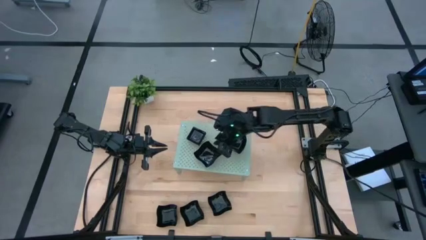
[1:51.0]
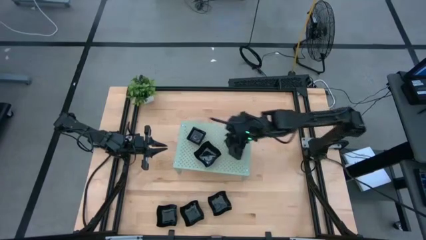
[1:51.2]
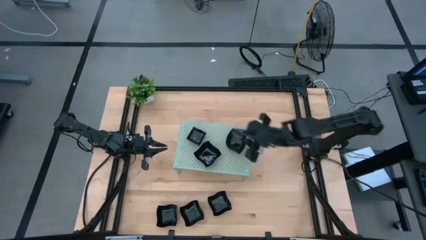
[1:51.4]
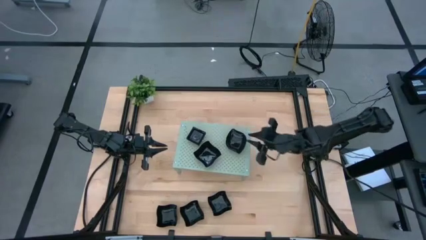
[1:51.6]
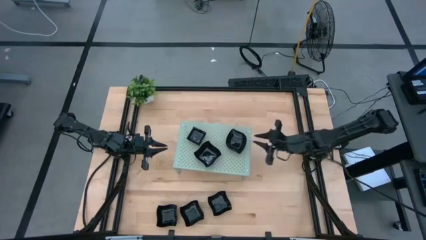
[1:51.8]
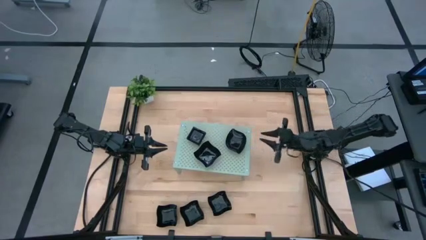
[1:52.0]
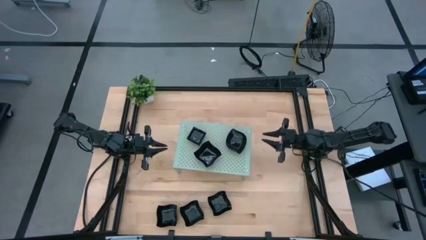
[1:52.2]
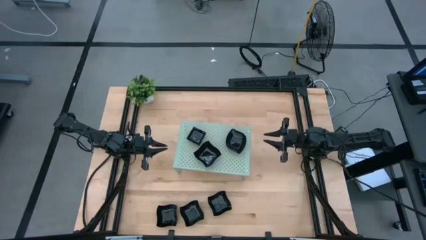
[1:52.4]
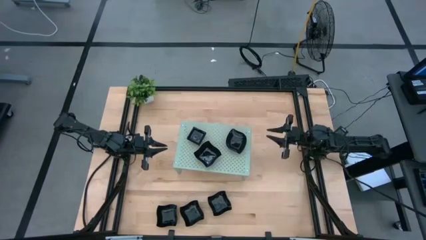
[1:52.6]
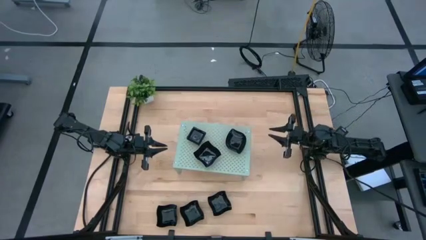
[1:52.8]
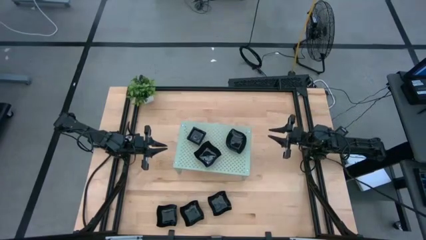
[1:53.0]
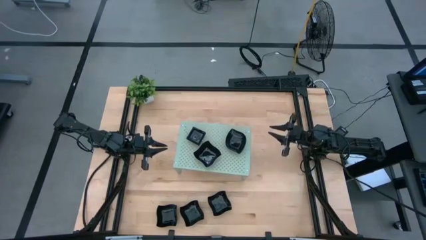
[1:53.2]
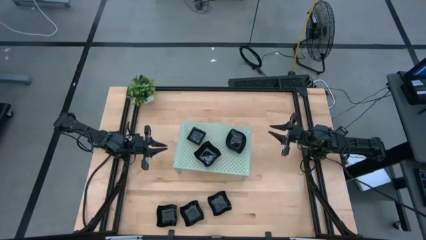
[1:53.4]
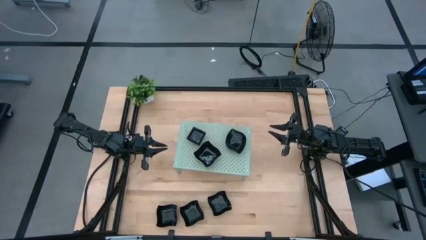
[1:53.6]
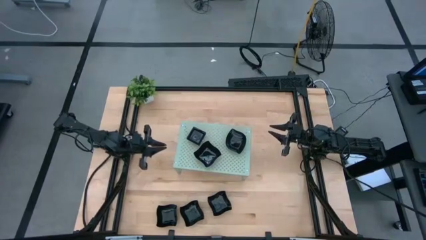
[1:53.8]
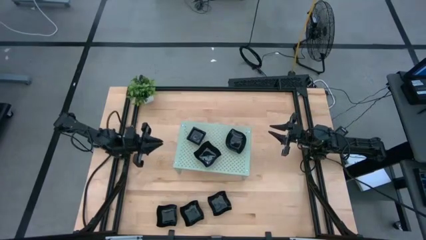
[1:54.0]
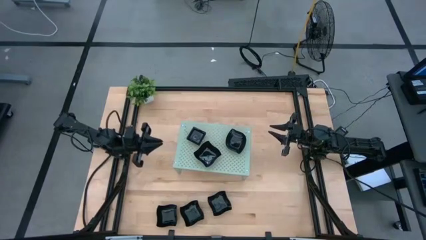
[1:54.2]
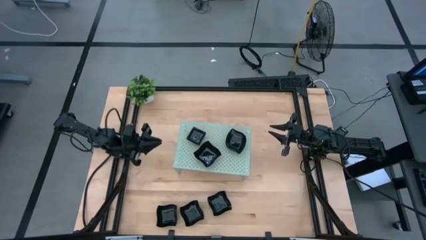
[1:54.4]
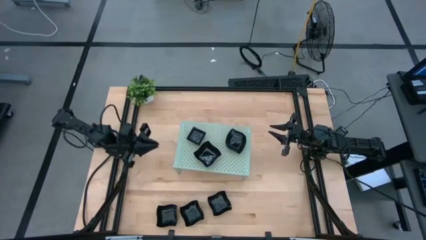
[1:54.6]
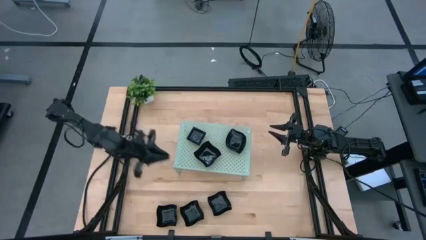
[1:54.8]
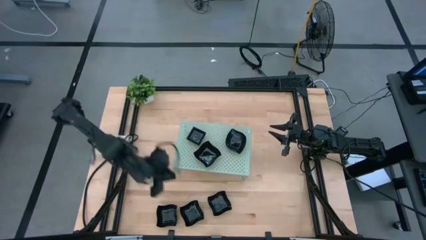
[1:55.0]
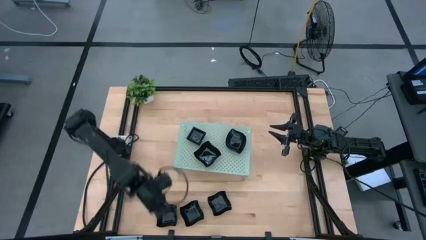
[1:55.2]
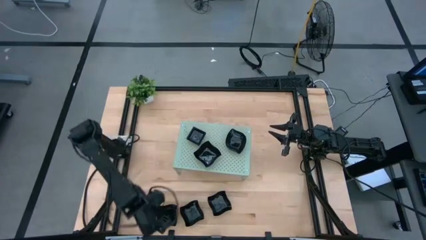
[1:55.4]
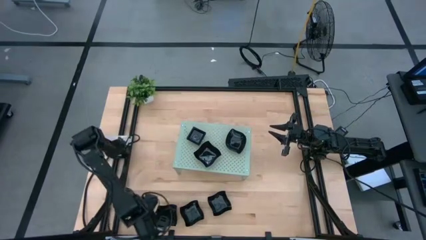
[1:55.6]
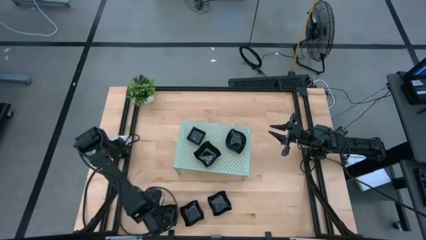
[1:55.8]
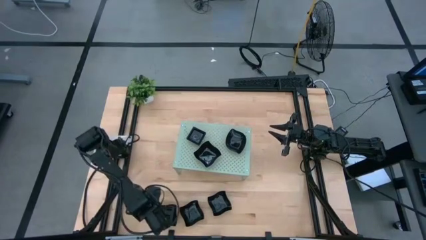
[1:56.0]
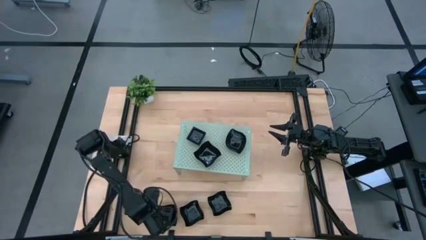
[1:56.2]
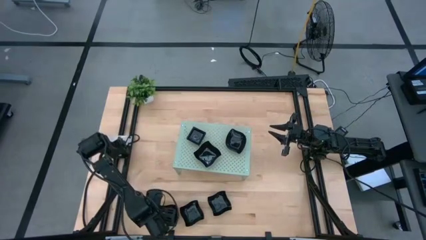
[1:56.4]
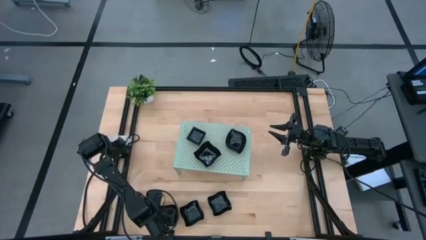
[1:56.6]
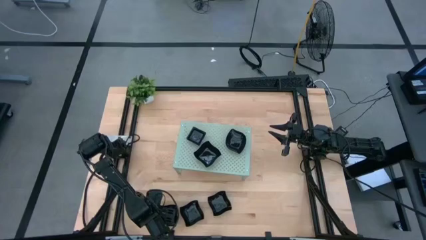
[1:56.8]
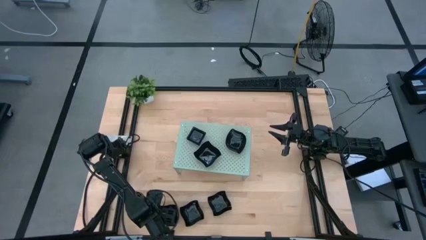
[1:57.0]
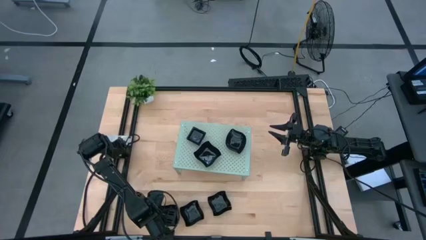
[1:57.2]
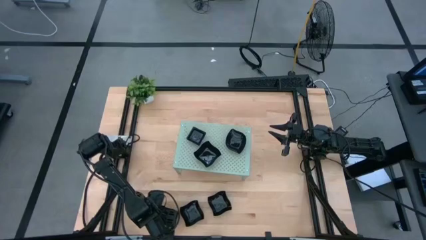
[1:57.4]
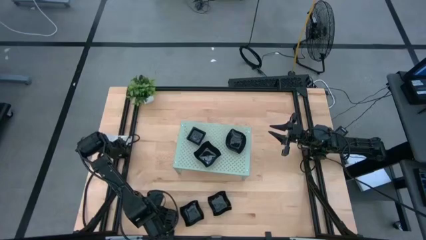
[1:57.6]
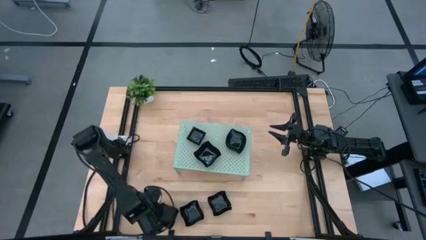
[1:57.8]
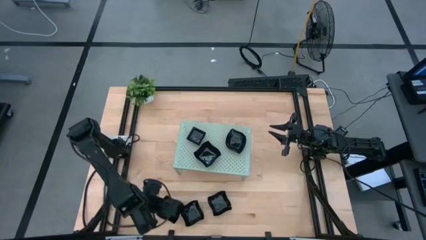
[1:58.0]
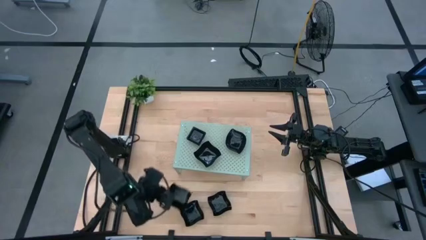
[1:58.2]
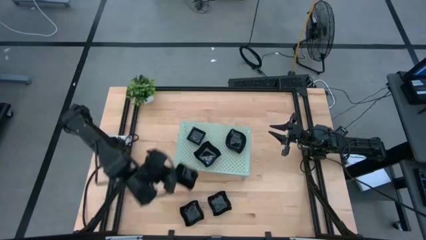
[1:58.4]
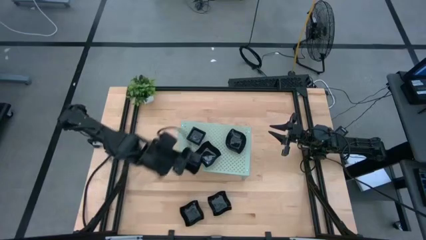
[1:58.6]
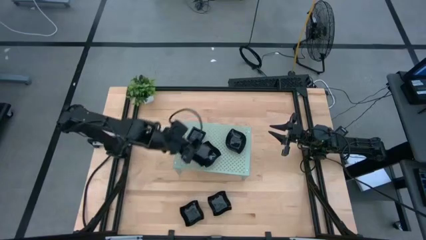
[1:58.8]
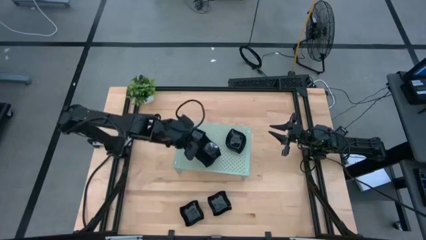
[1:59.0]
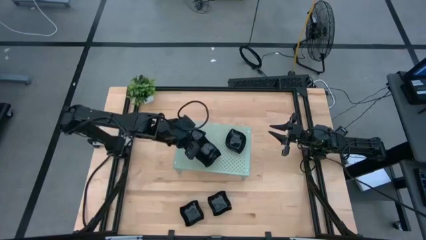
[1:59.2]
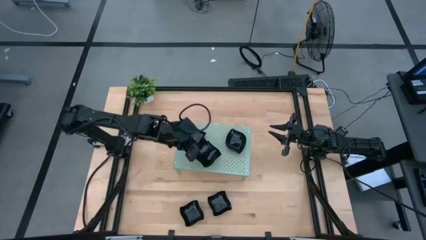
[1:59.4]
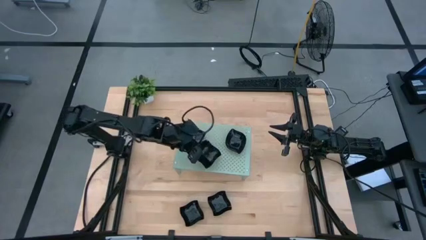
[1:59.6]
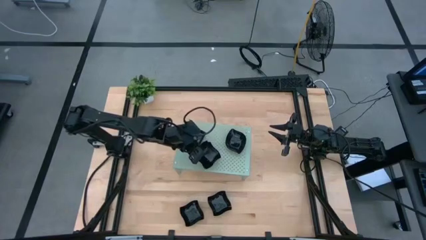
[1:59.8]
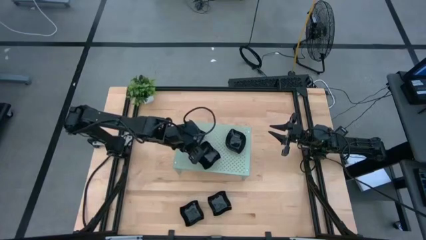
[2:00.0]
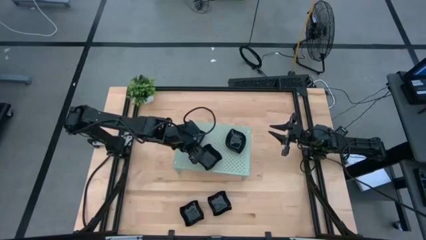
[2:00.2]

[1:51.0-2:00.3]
Task: Pick & Place Mini shaped plates
Stack the distorted square plate on top of the distorted square plate on the shelf

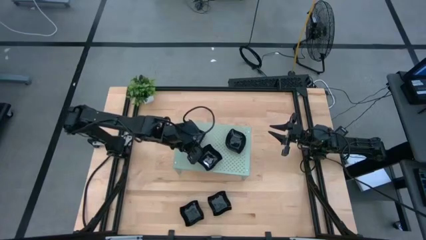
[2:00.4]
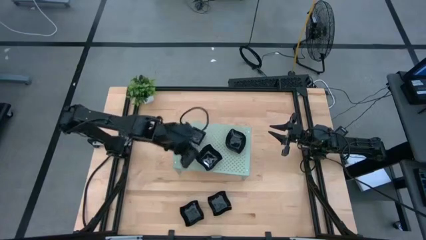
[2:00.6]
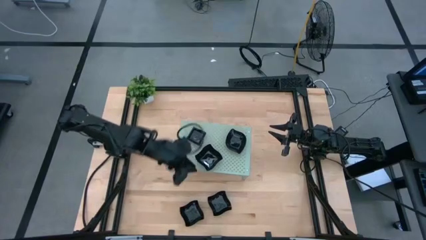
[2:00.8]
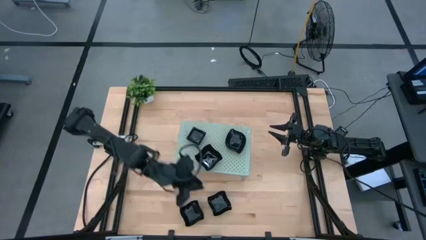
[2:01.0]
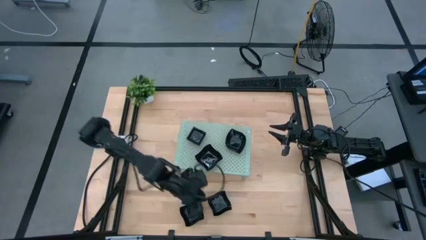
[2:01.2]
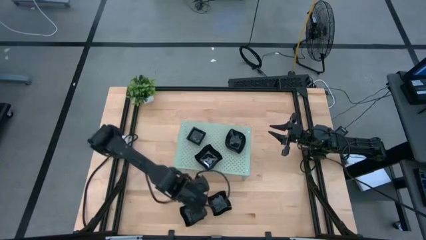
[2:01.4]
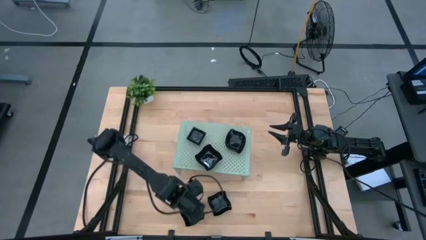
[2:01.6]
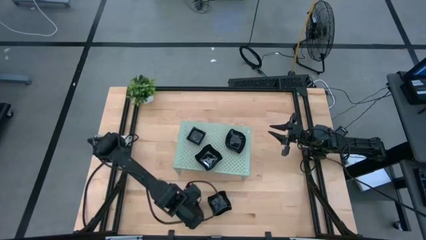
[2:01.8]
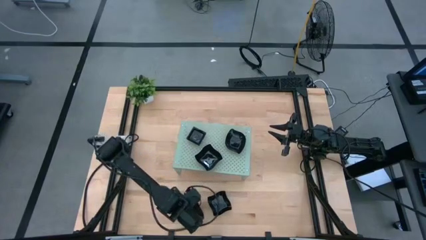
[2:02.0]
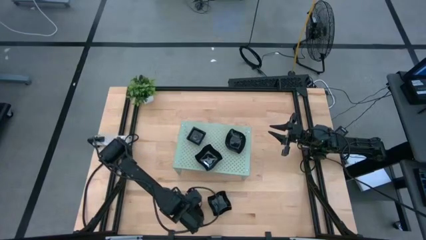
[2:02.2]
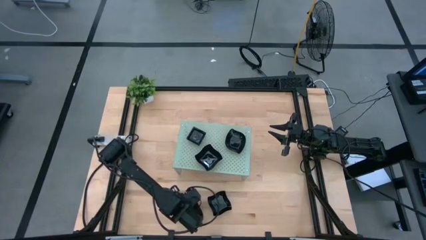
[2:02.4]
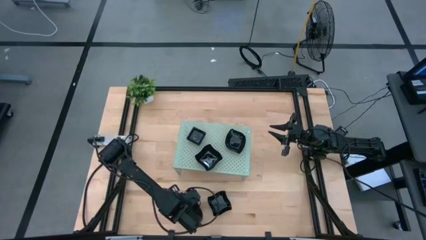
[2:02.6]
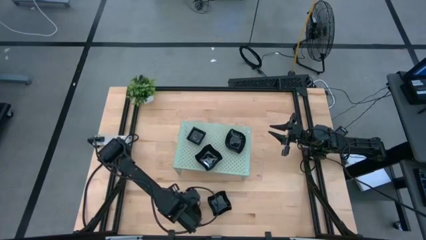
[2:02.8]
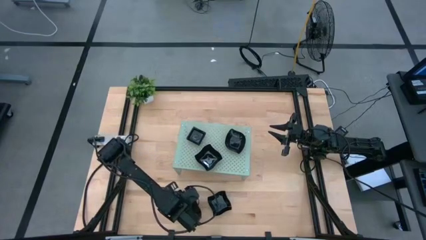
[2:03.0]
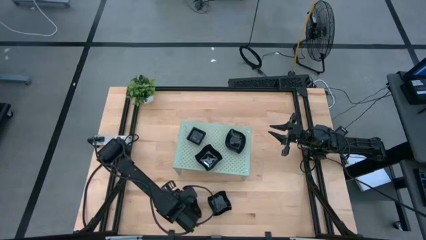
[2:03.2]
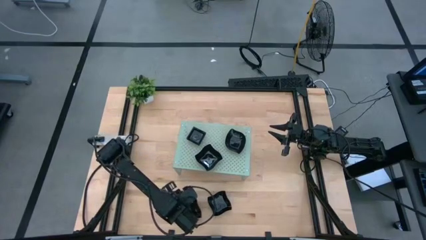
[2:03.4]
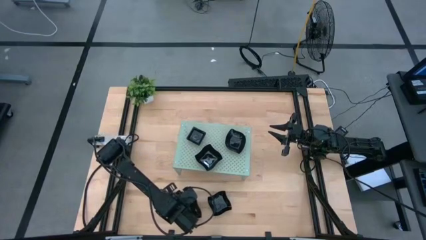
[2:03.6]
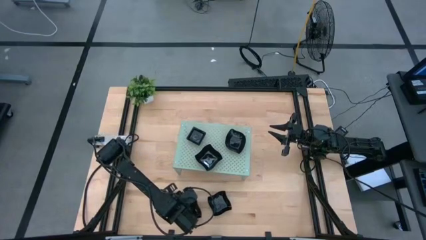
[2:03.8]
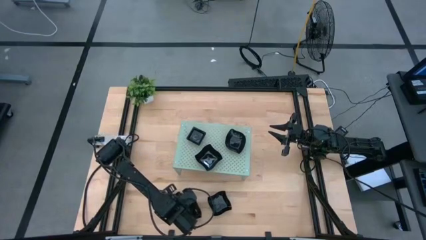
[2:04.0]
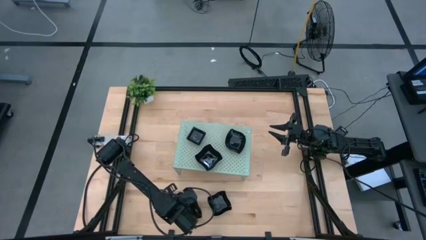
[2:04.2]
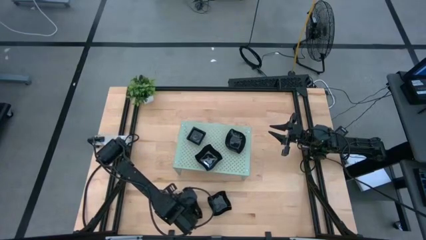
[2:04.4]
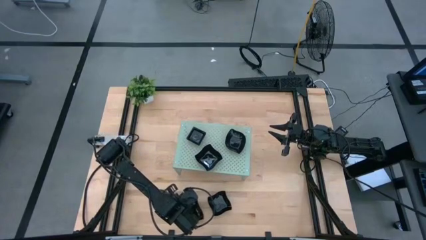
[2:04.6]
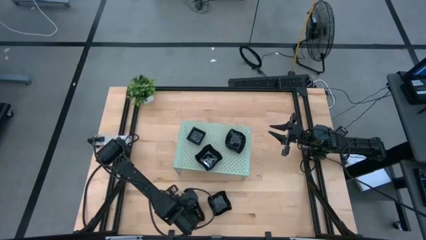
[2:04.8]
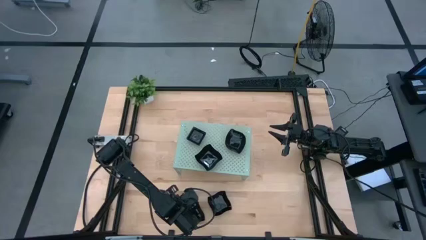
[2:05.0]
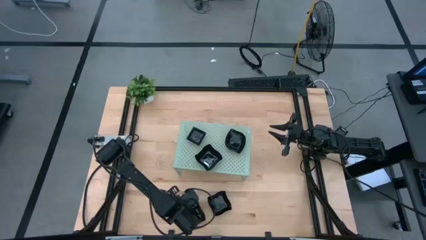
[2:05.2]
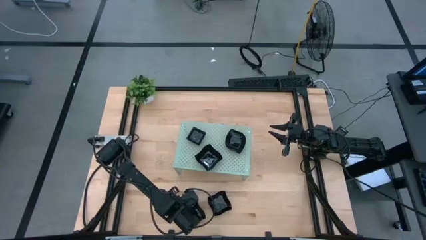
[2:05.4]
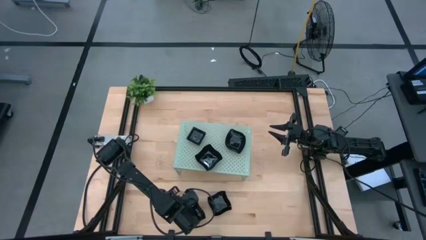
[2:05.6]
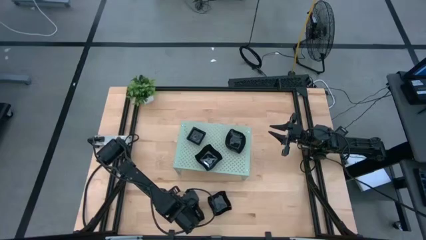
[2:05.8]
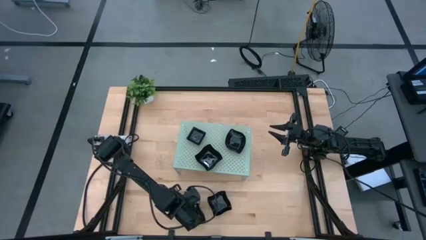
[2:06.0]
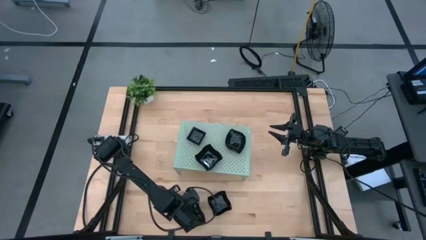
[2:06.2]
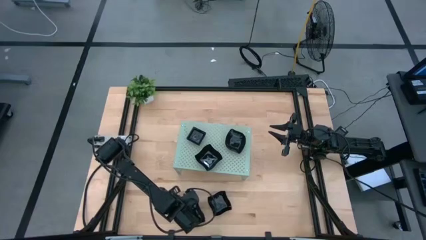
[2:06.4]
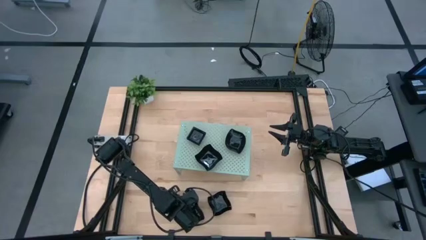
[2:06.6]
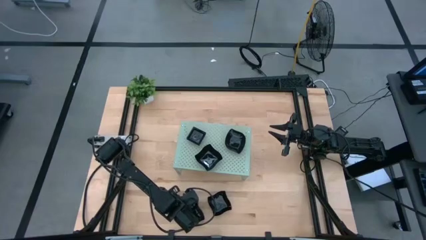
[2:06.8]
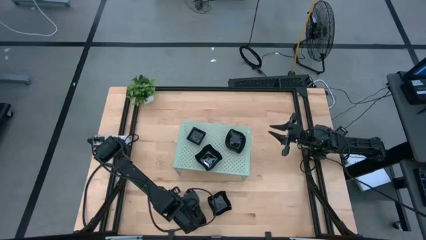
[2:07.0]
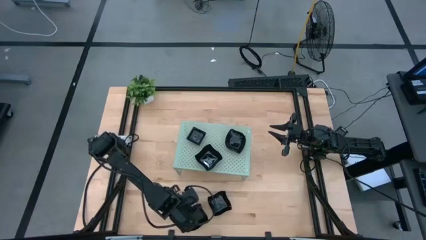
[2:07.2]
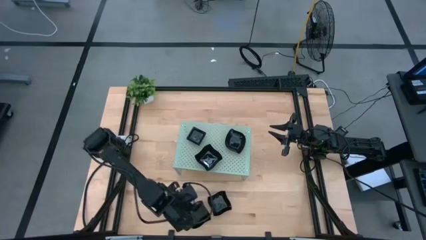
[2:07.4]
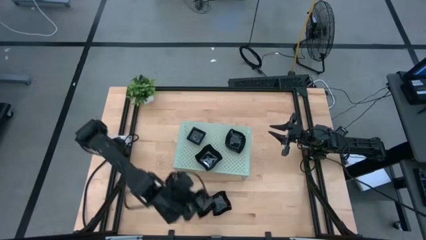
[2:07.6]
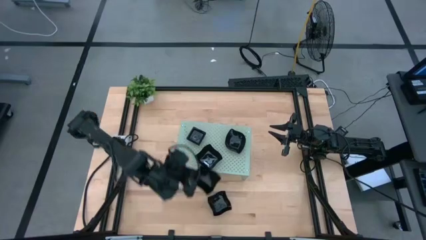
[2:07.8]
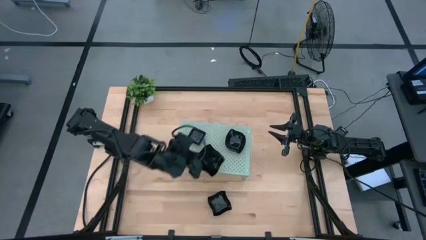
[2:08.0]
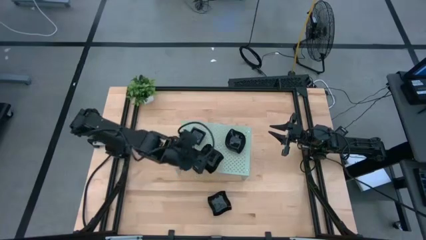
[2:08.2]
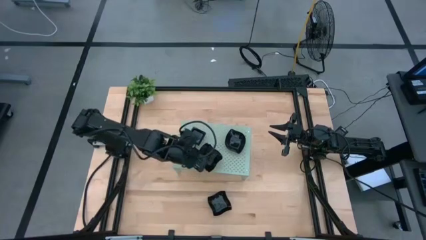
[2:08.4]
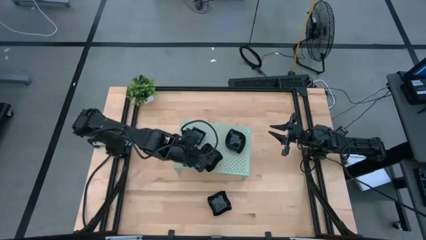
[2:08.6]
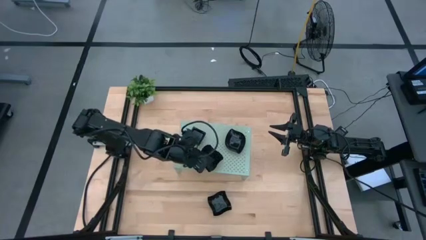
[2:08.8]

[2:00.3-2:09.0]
Stack the distorted square plate on top of the distorted square plate on the shelf
